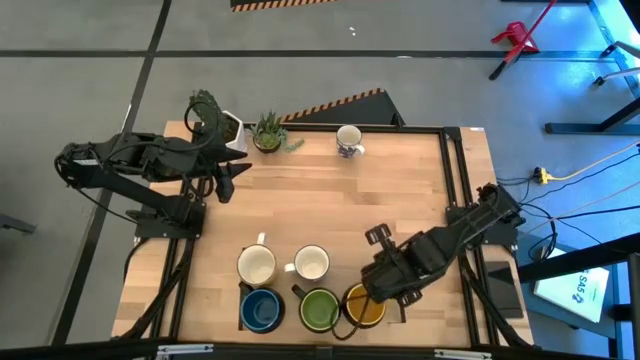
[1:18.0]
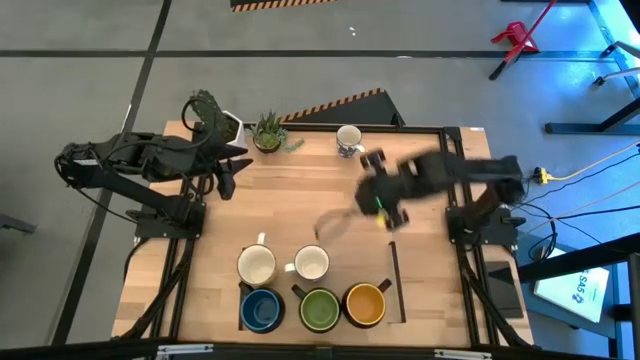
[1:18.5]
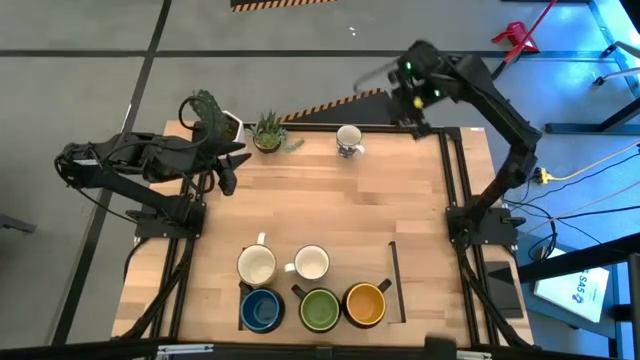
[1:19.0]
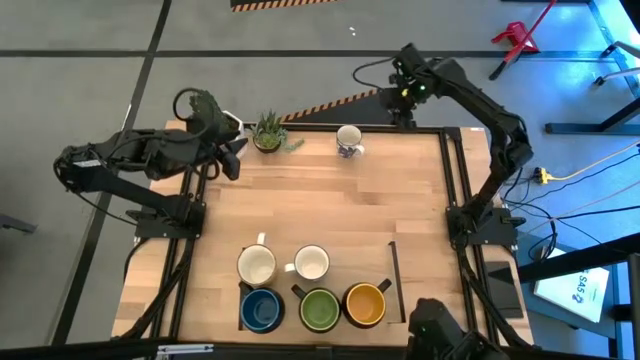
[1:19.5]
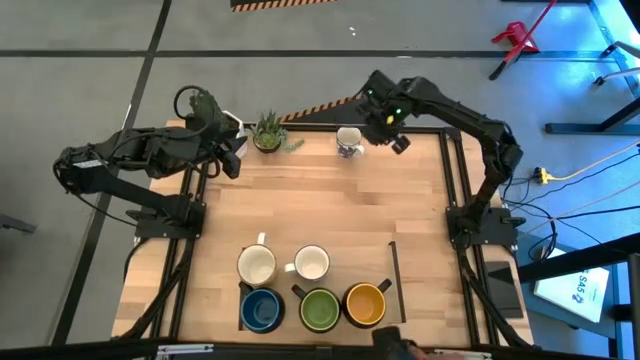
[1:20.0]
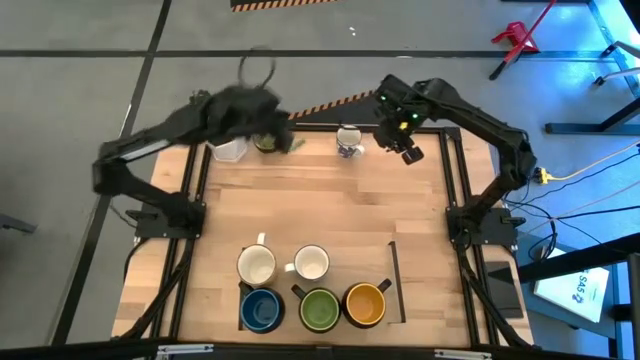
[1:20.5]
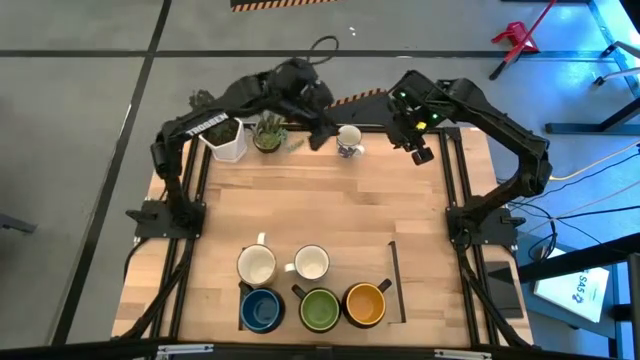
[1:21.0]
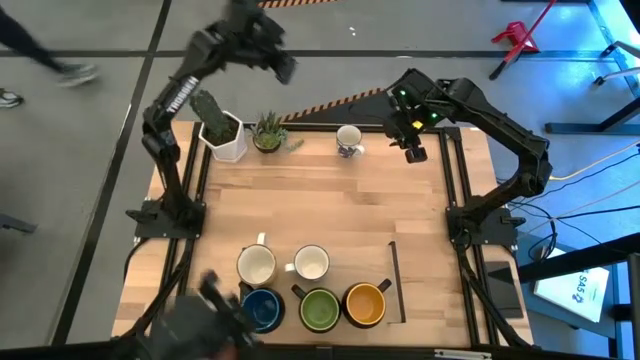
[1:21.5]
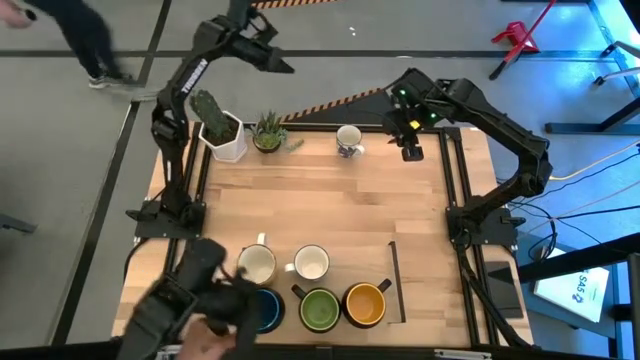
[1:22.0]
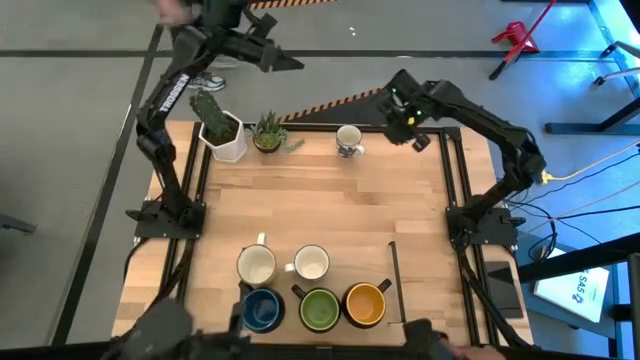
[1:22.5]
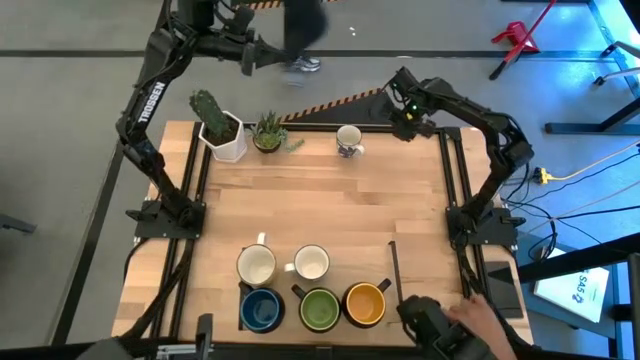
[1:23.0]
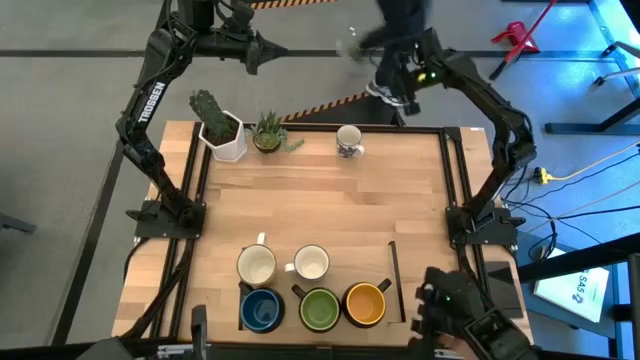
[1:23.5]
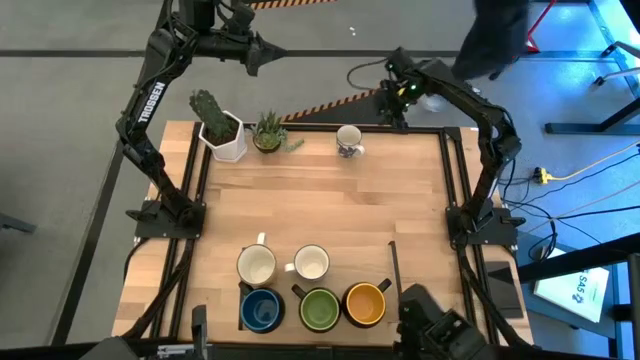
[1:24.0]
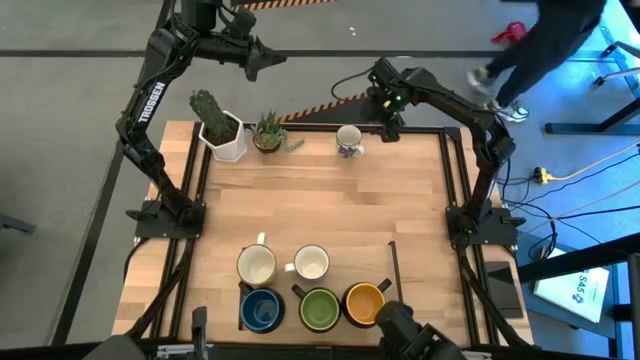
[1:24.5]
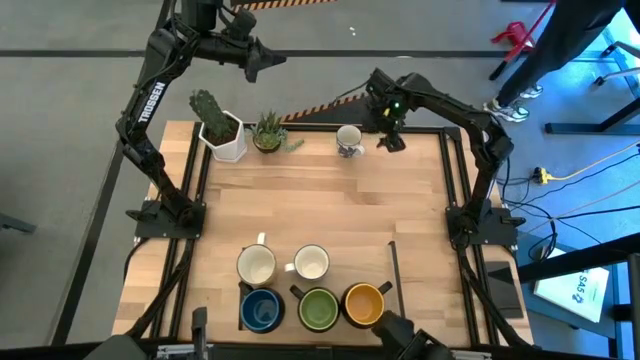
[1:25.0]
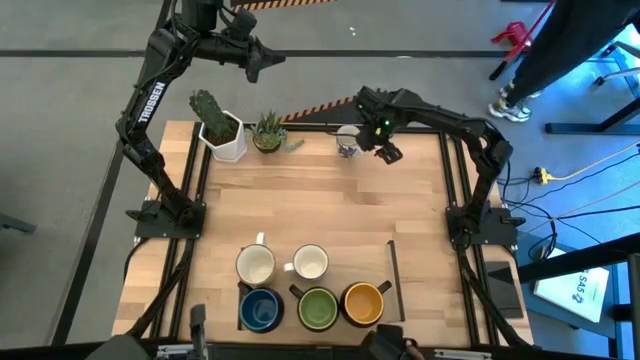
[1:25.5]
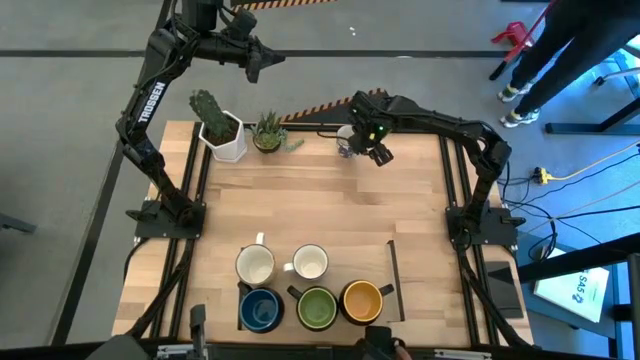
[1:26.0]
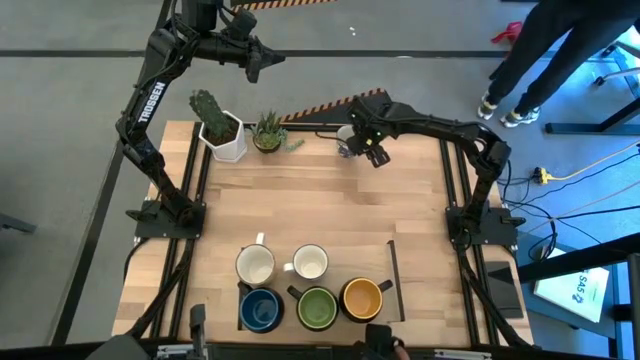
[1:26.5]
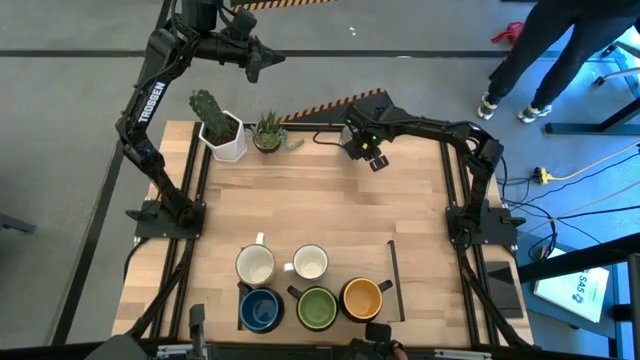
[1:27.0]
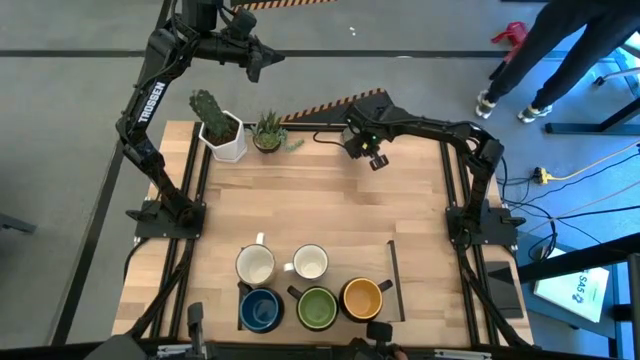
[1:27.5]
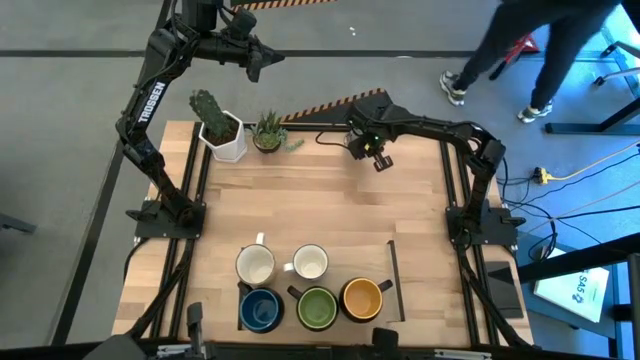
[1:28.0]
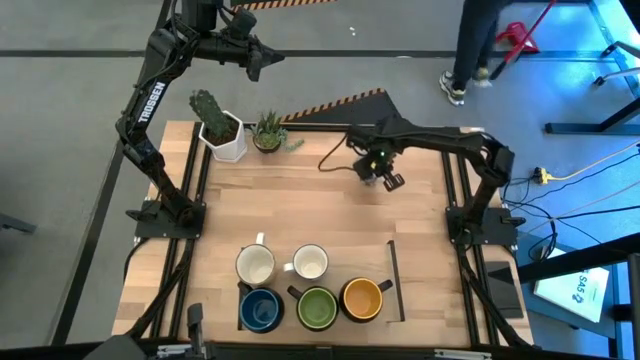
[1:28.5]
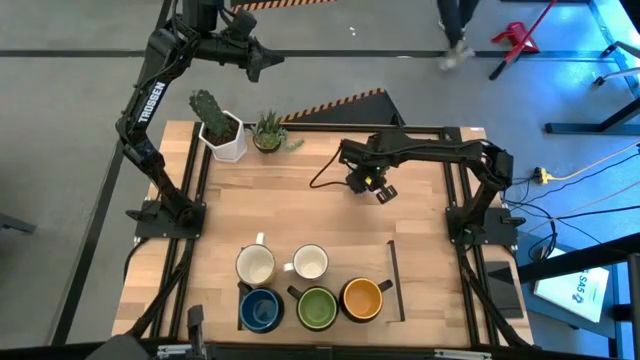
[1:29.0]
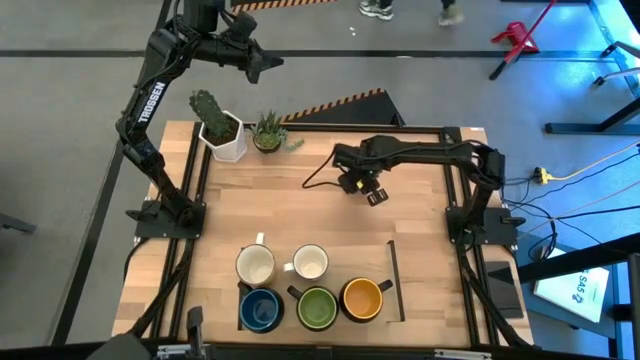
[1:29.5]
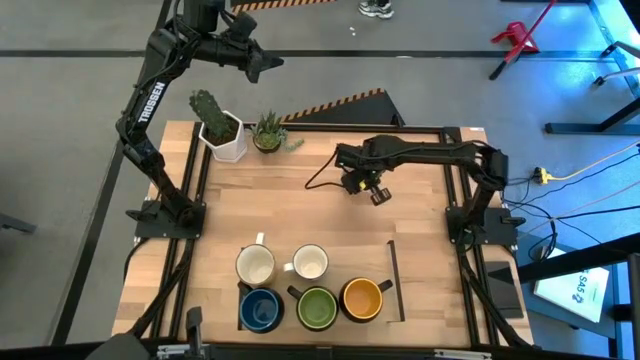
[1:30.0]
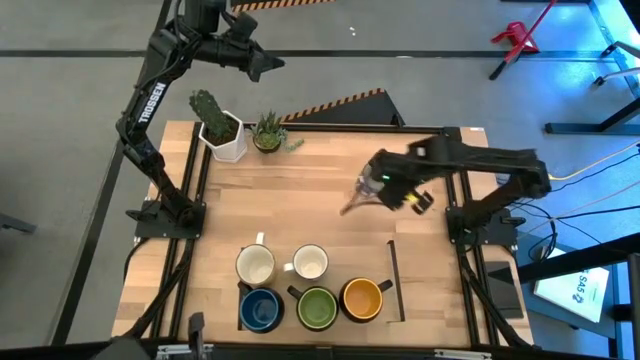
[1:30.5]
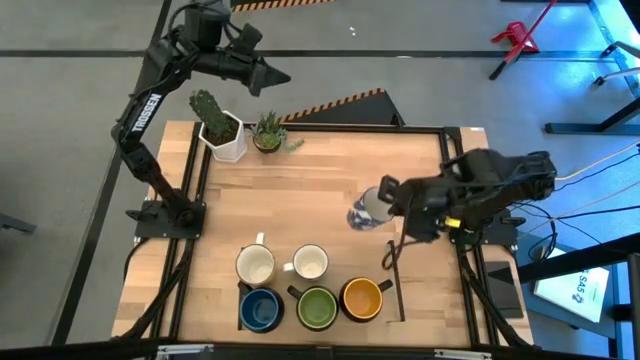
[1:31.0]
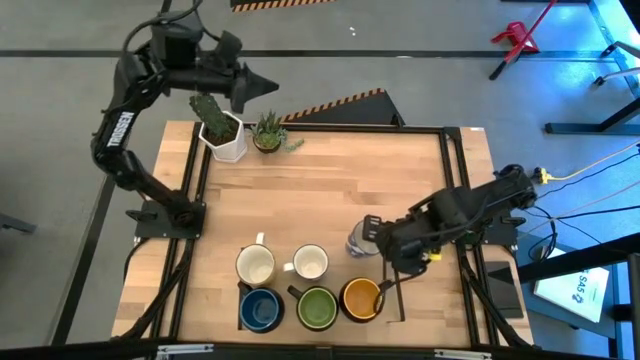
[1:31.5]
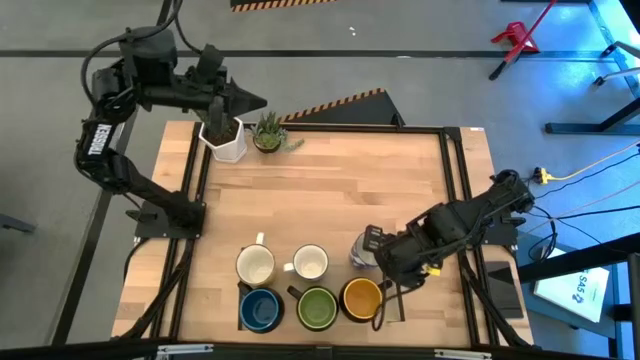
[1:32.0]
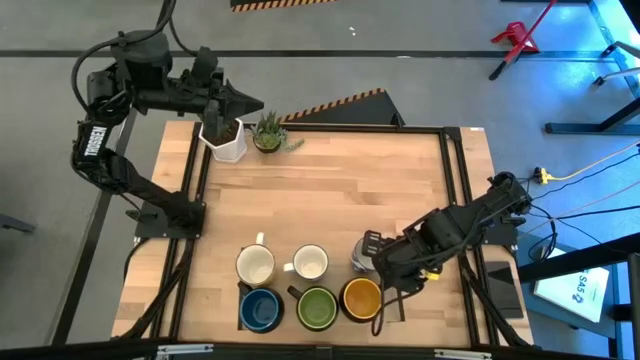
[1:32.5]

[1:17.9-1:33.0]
Task: Place coffee mugs
Put the patterned blue mug on the shelf

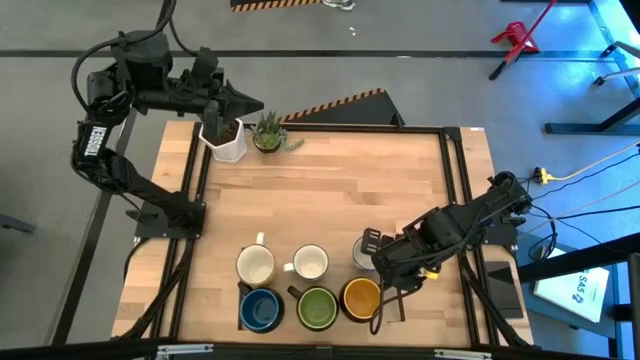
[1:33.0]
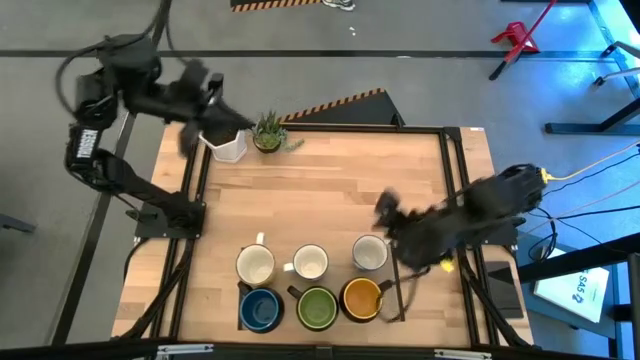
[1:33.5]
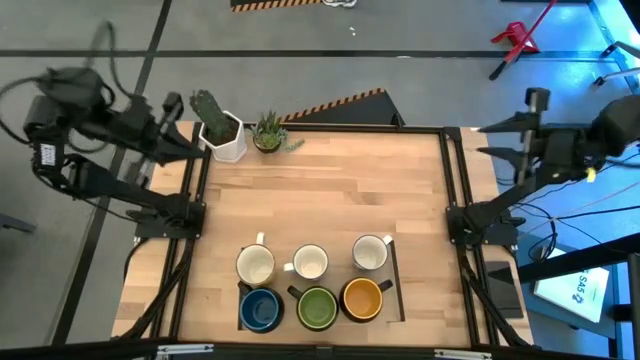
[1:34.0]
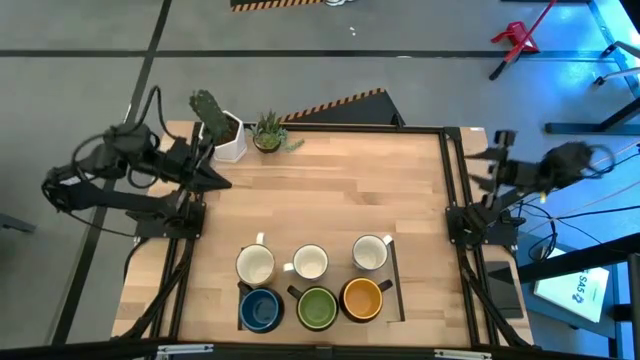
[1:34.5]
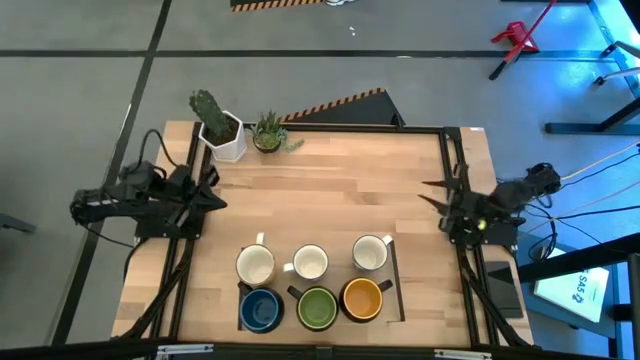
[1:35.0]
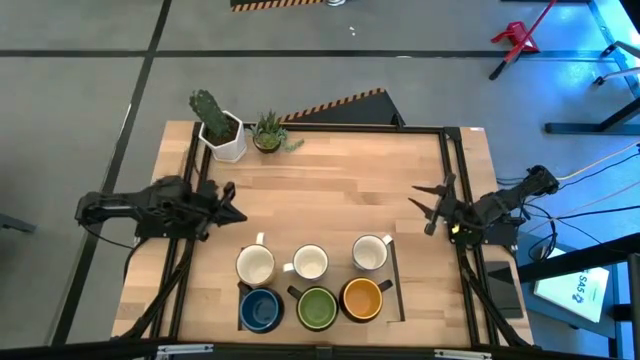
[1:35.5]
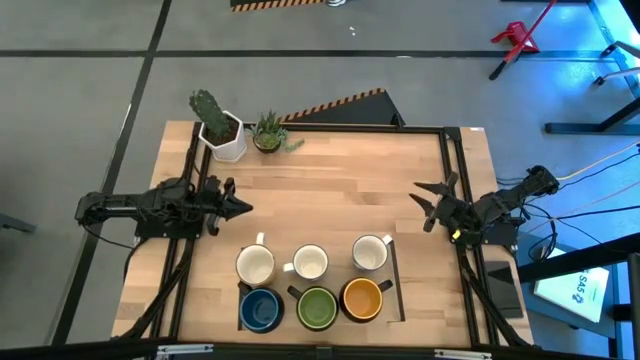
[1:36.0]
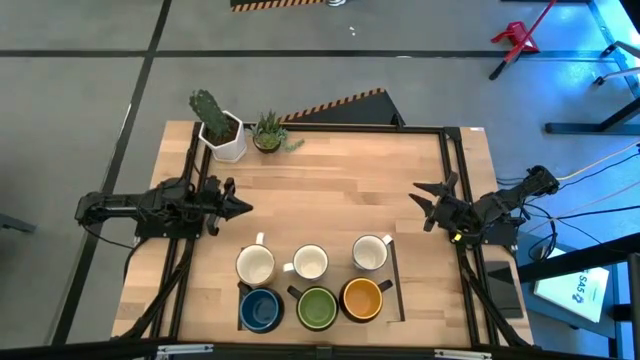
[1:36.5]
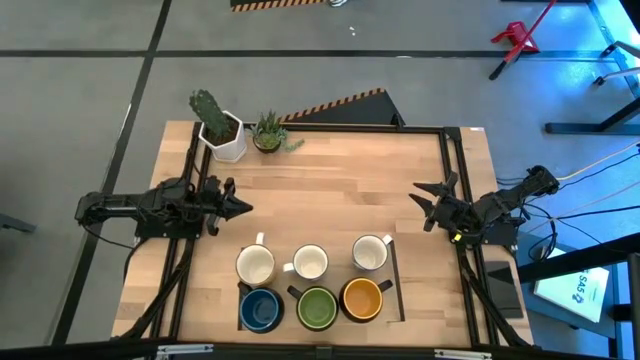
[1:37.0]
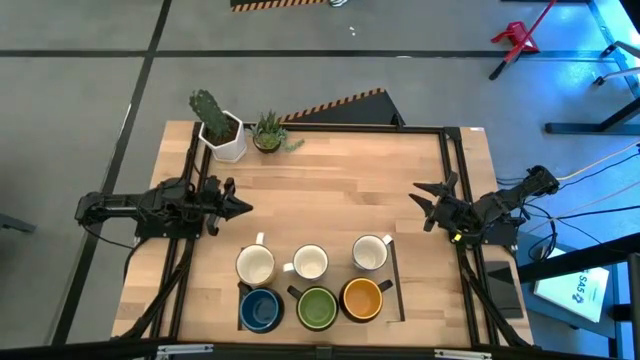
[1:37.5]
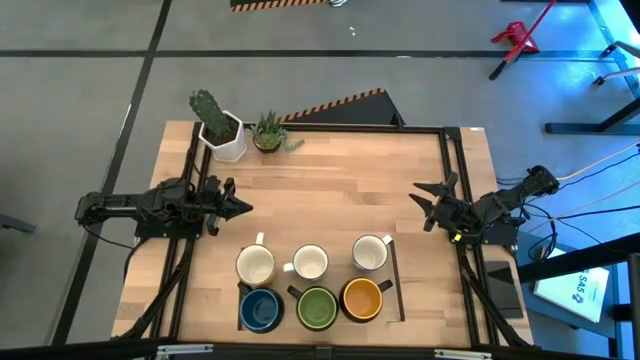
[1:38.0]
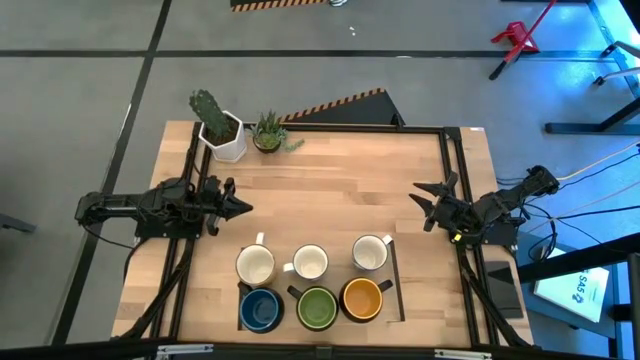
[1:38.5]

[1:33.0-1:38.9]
Return to Home Position
